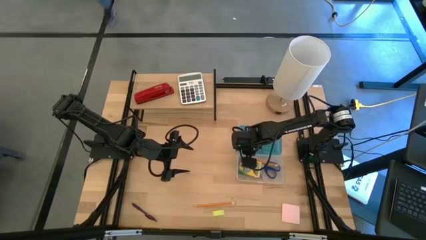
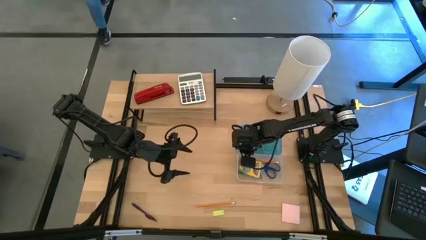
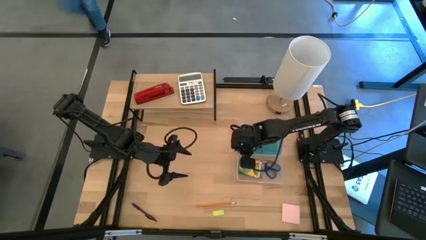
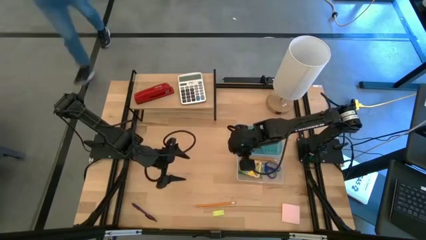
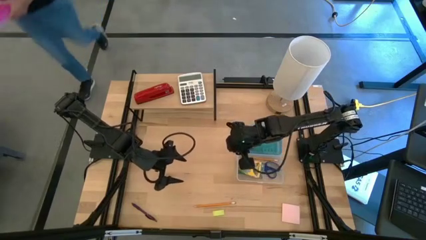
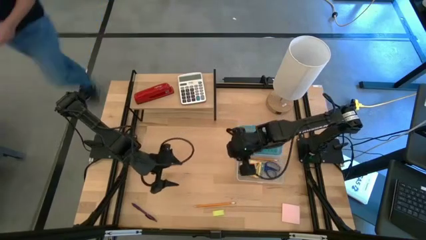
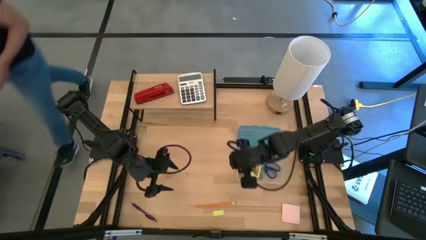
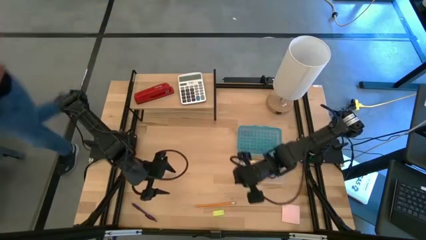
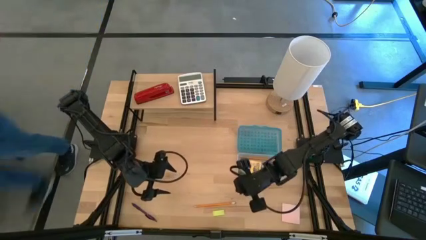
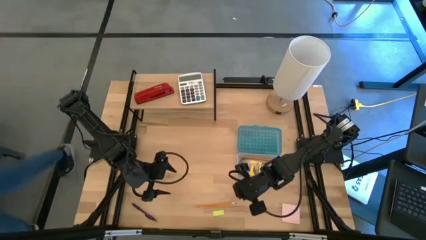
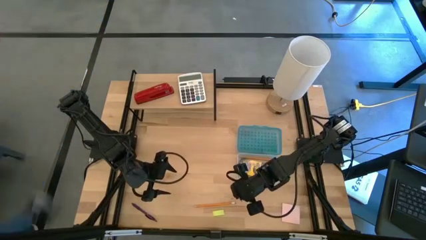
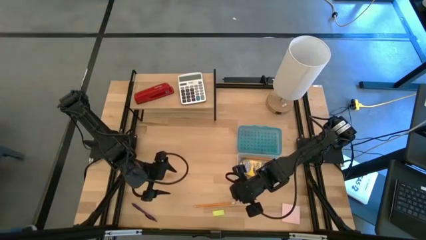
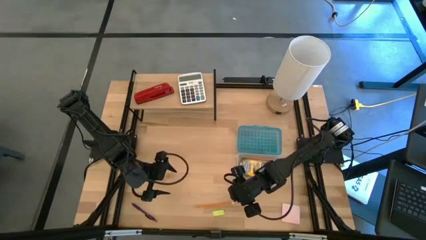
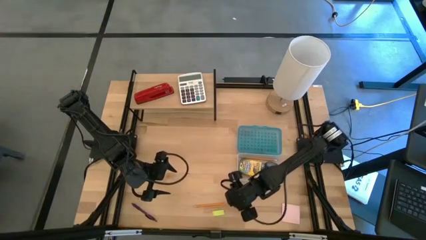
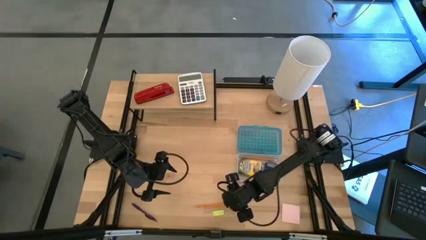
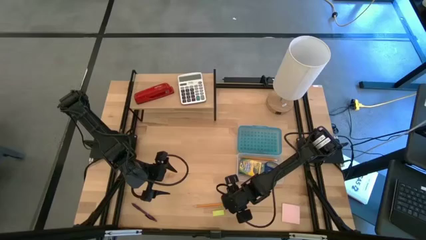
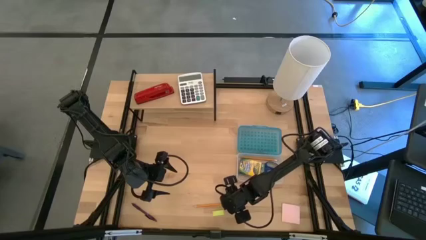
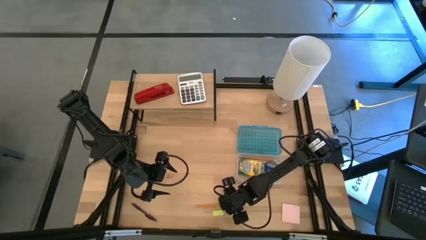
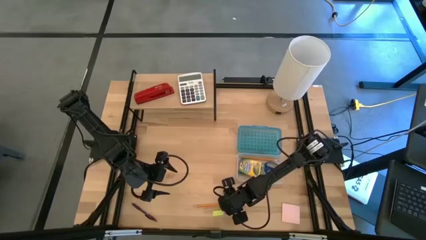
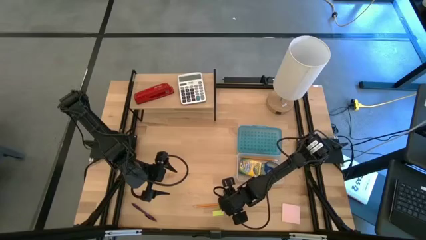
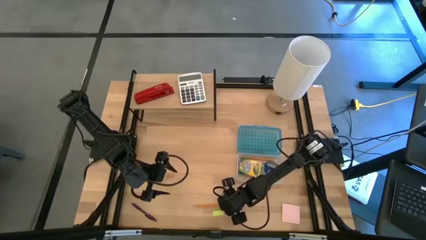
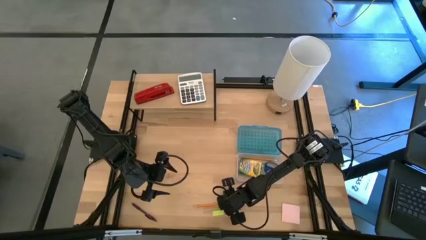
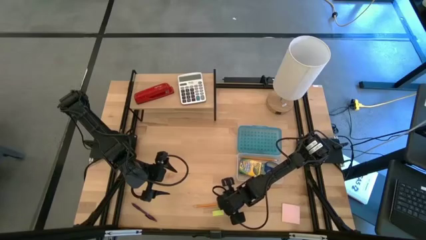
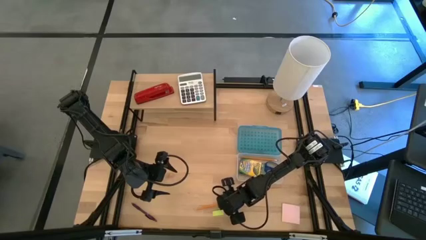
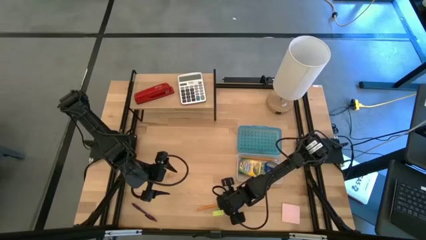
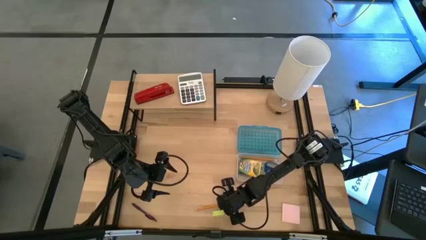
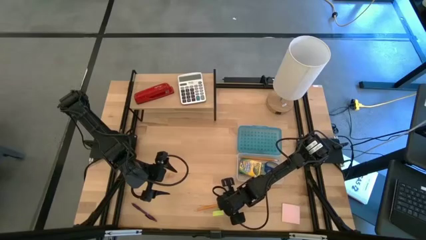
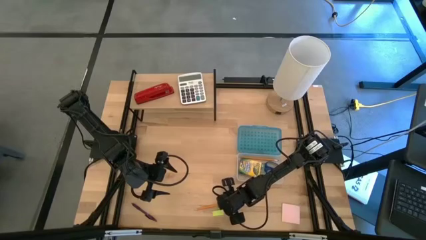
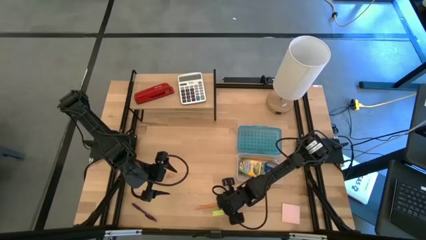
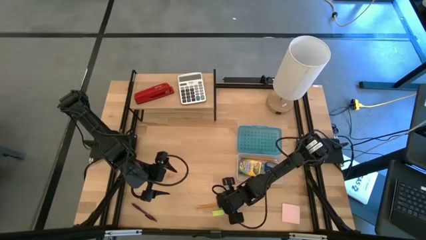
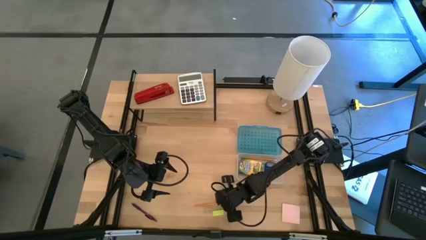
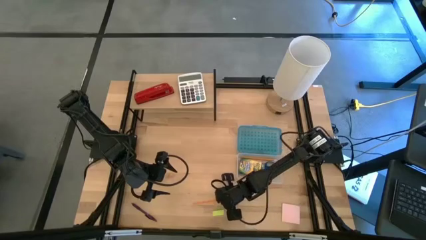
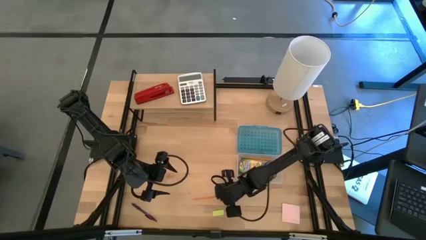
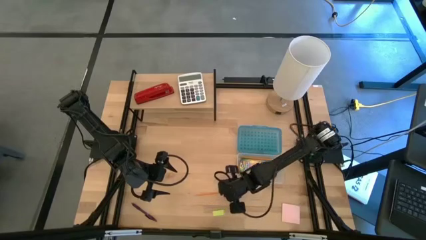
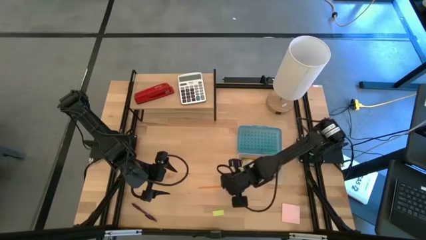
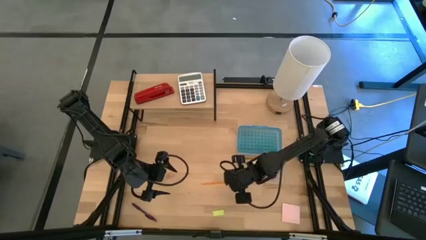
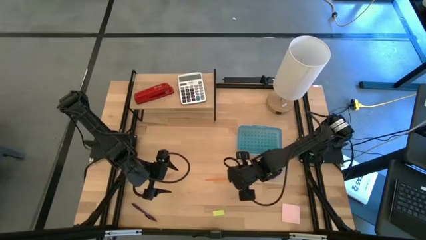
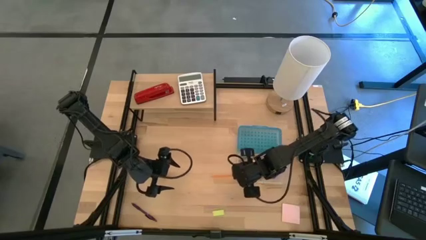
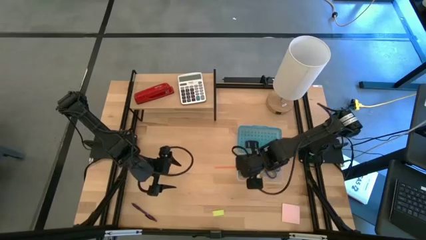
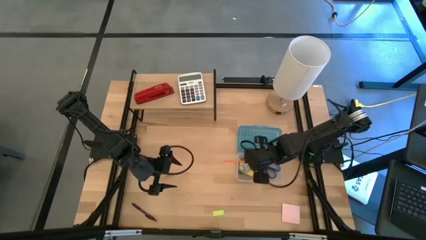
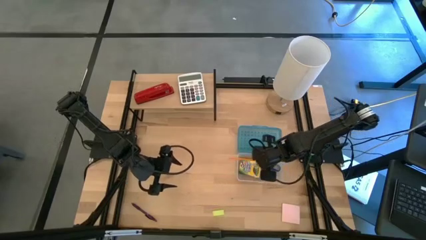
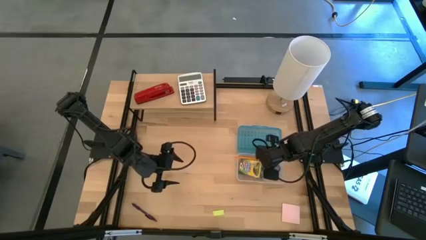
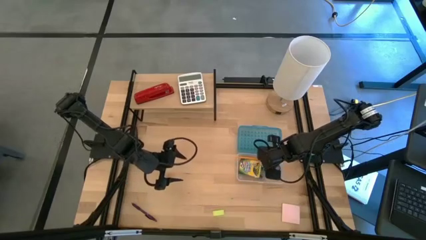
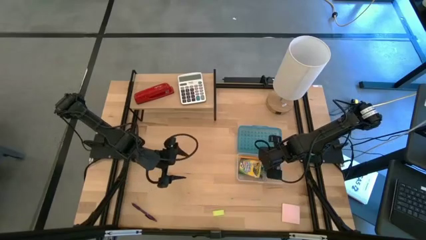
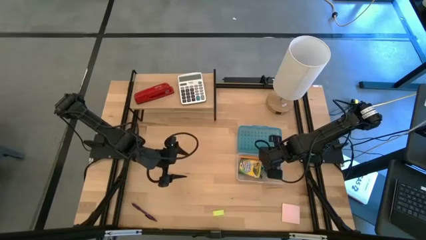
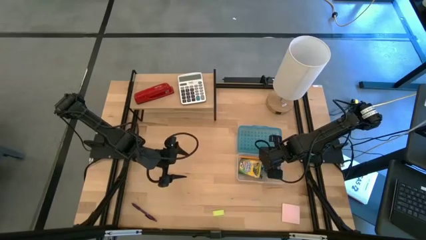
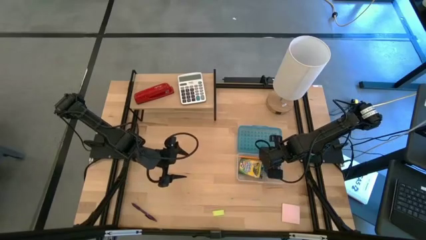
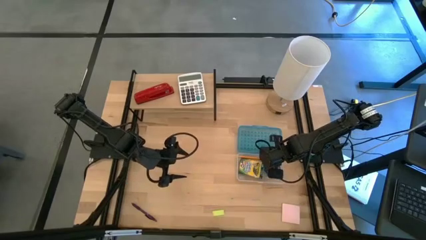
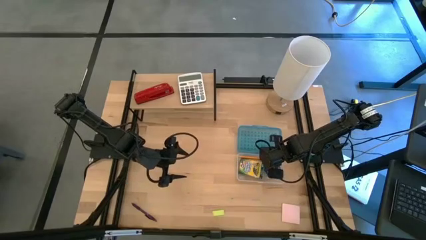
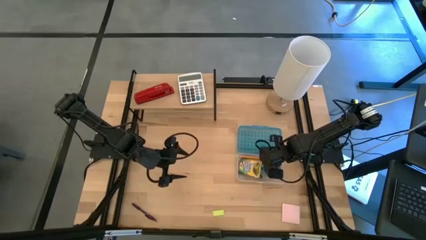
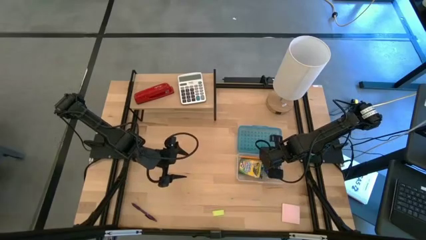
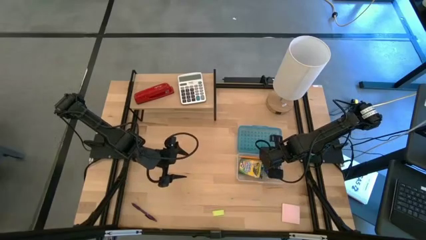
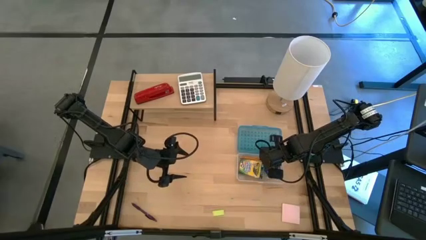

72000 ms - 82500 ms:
Task: Pack school essentials
Put the orange pencil into the blue supply box

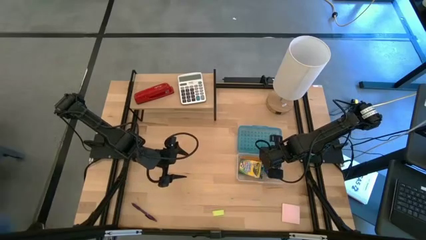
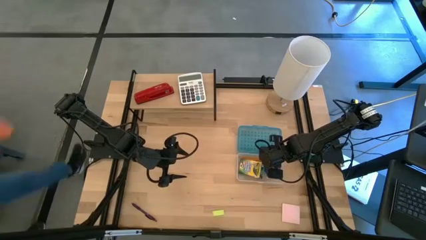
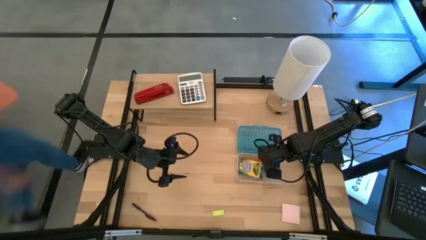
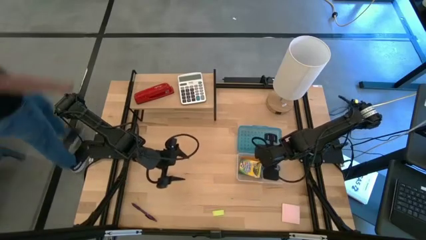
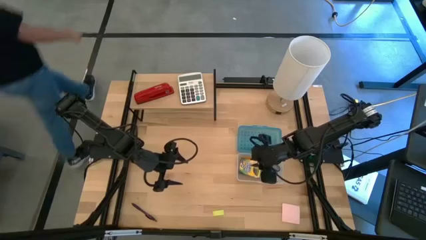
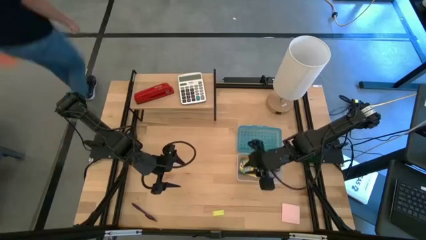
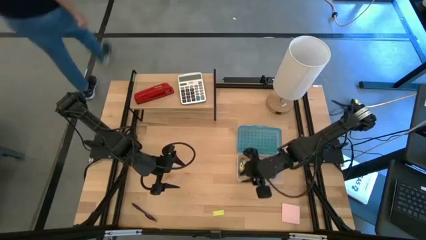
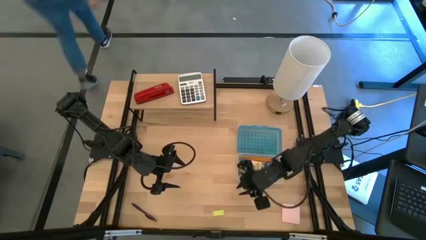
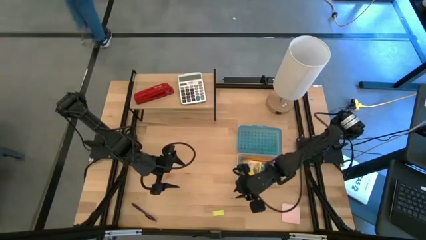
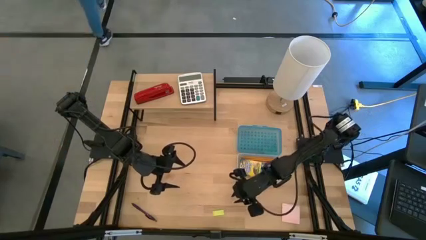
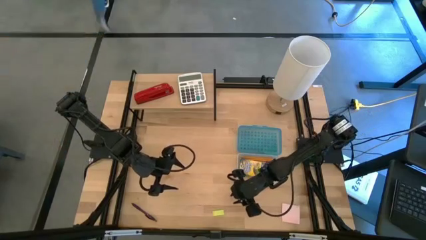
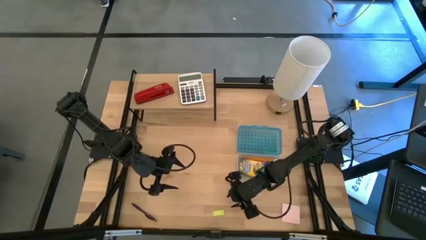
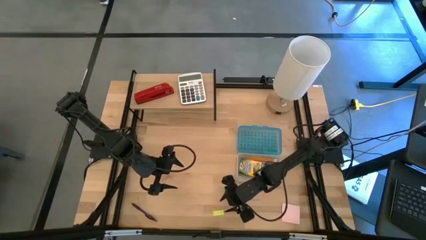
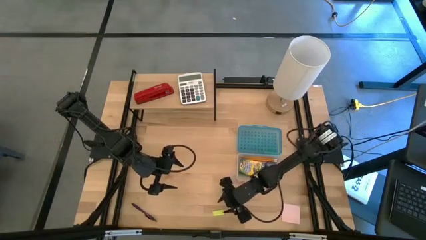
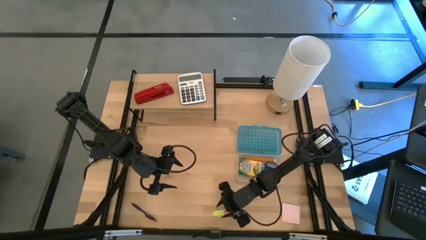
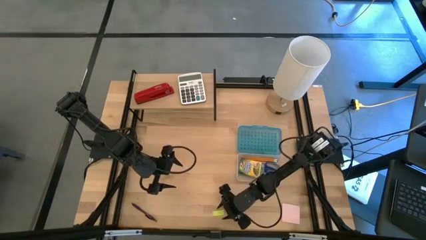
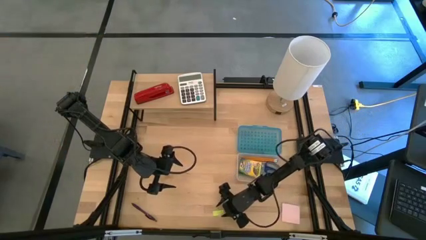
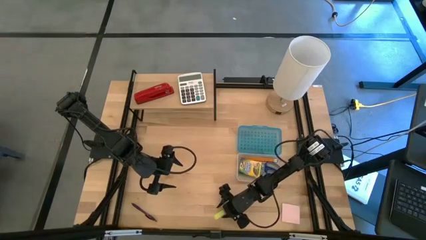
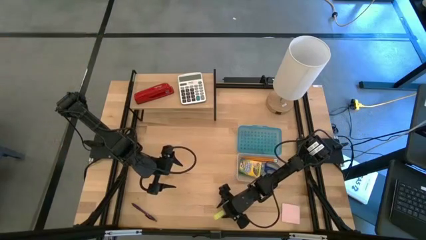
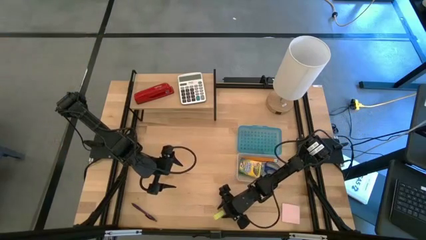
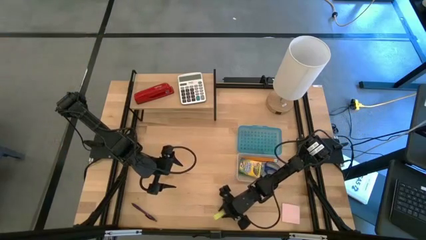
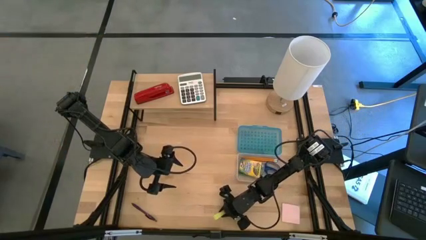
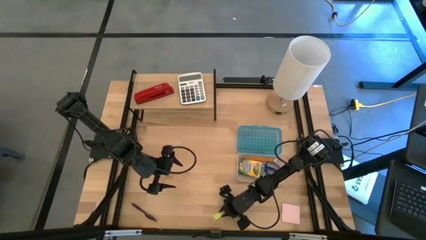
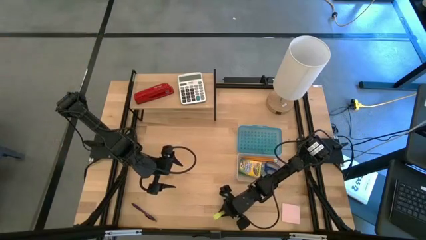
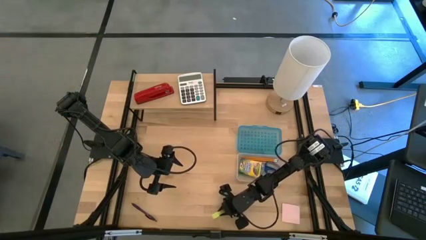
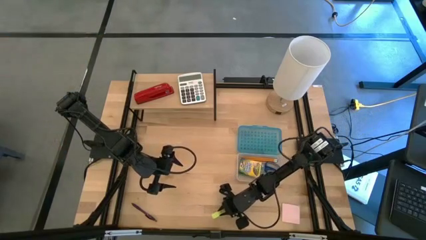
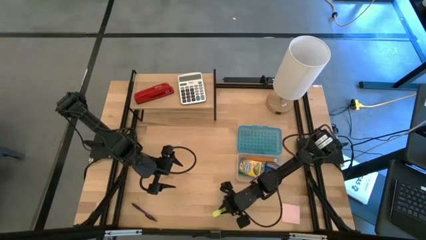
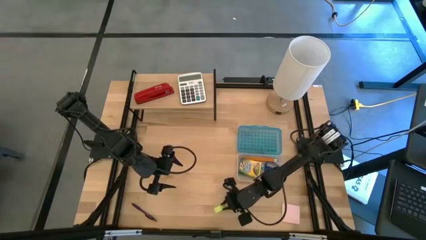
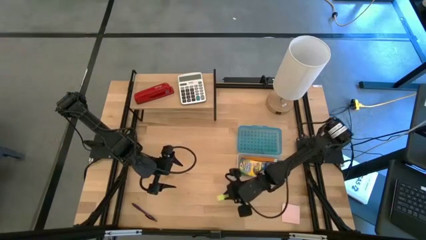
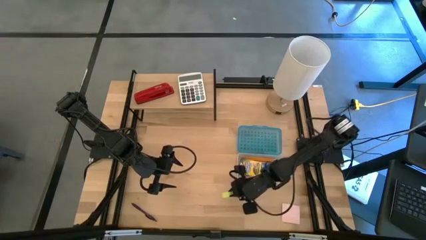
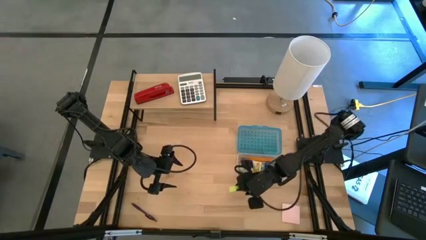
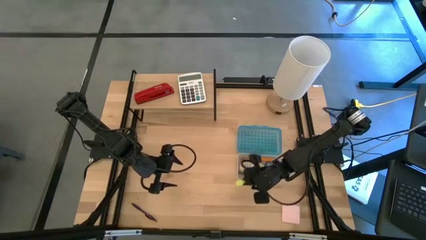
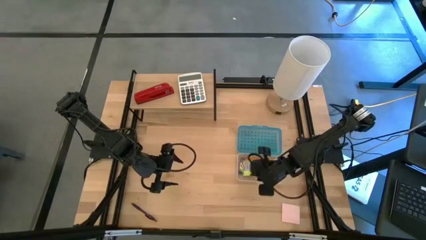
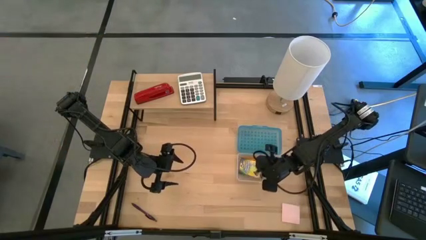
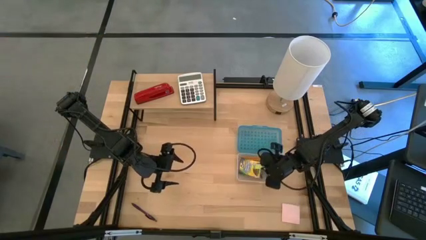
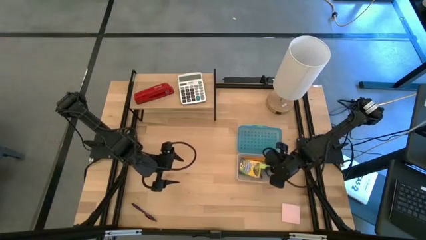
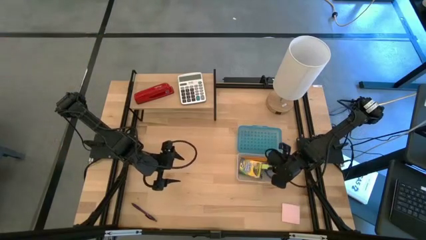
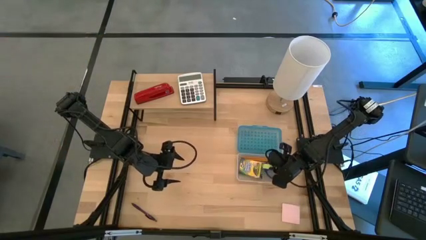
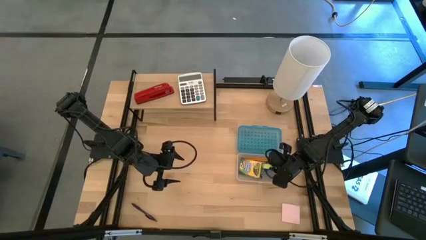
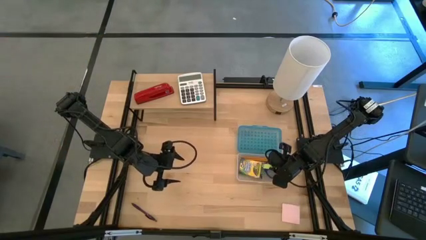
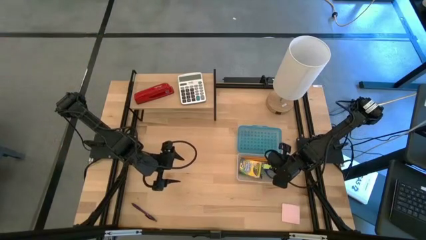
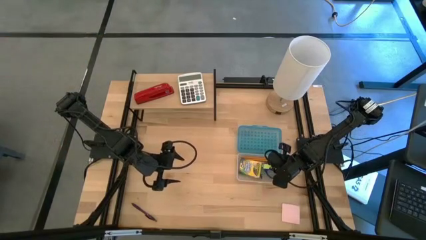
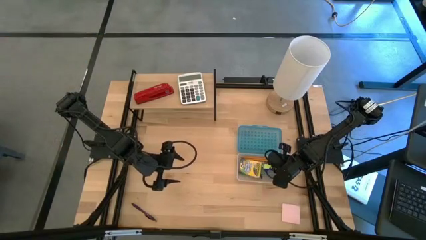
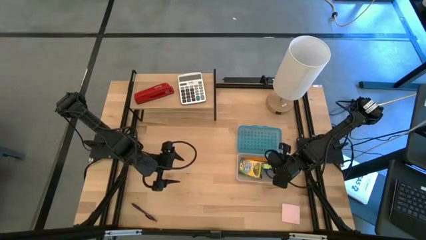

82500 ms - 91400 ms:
Put the light green eraser into the blue supply box
